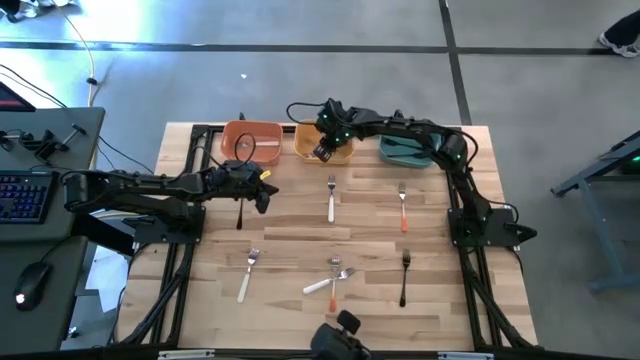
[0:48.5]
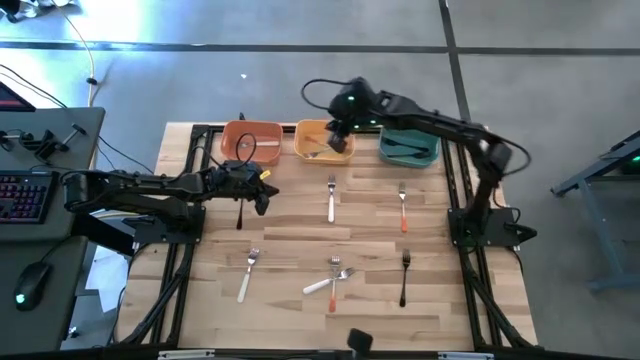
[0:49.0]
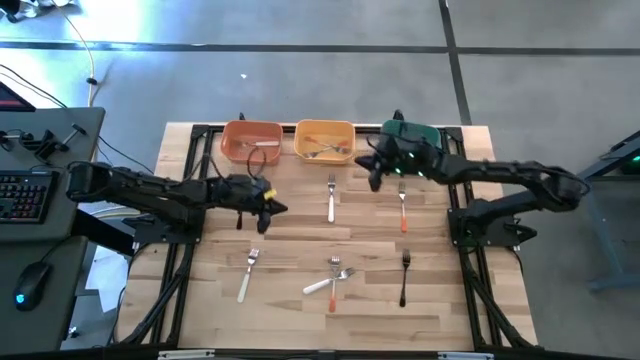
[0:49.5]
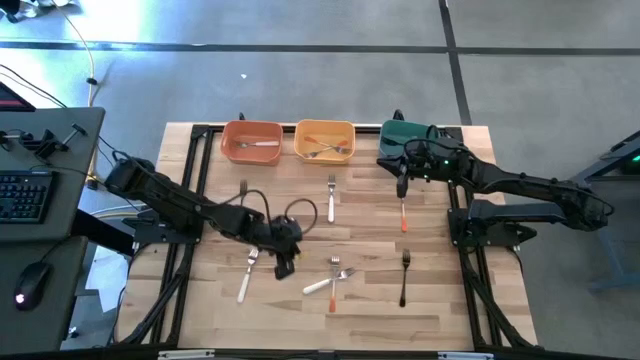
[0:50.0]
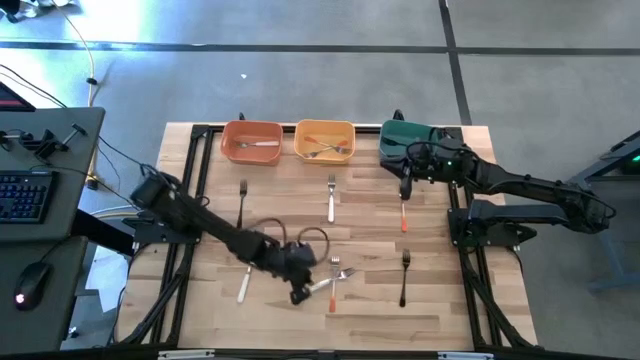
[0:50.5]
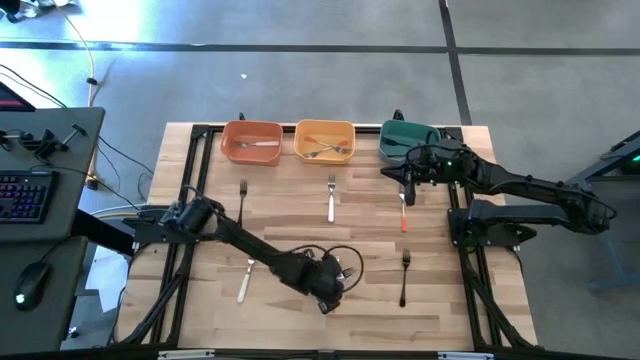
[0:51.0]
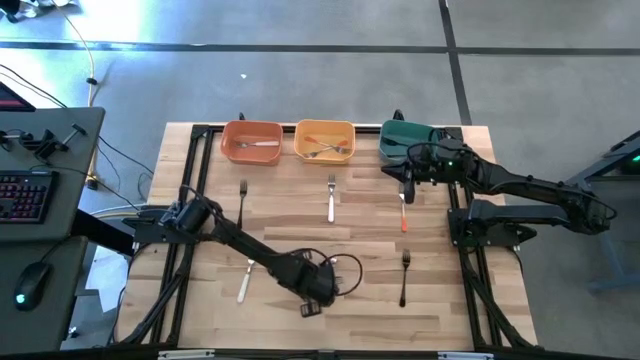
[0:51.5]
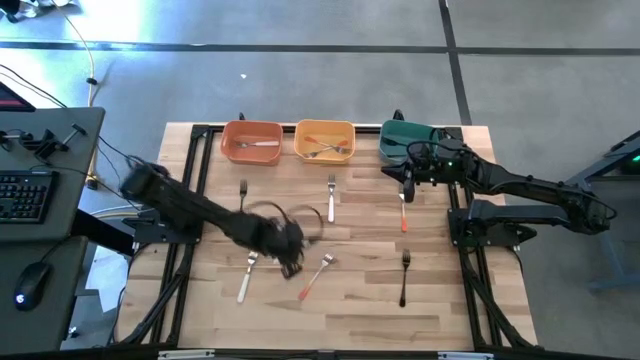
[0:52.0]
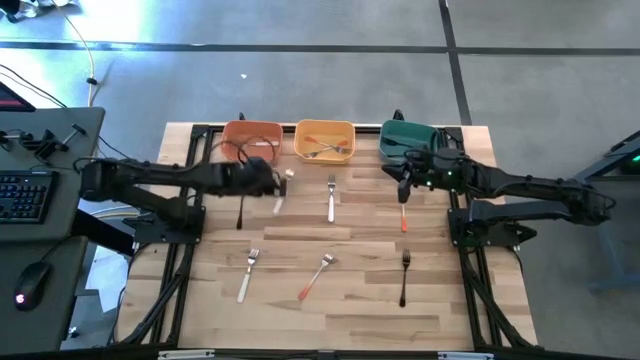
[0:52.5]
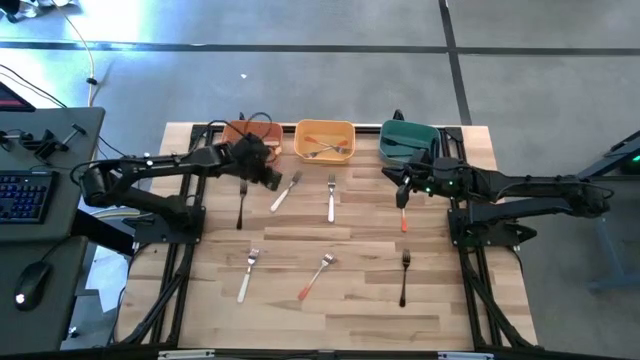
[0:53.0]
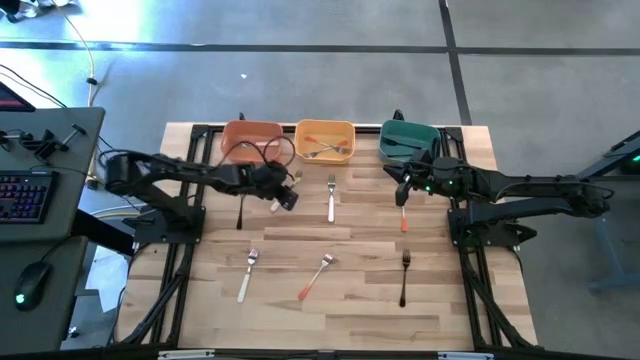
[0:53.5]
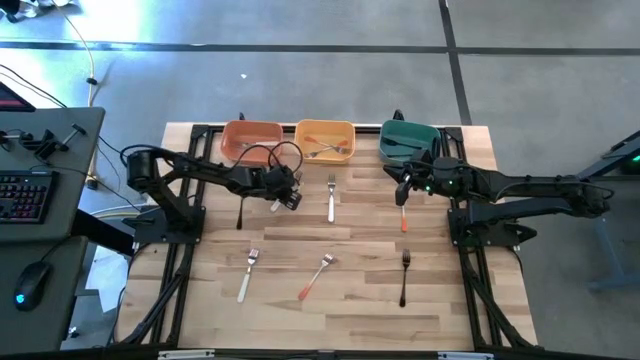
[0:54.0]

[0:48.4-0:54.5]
Task: Sort silverware by color (type)
Put the white fork into the orange bin

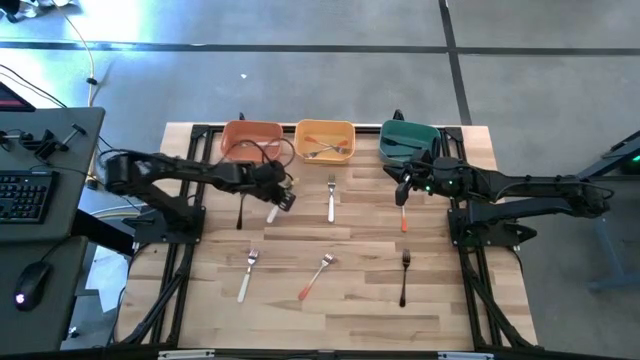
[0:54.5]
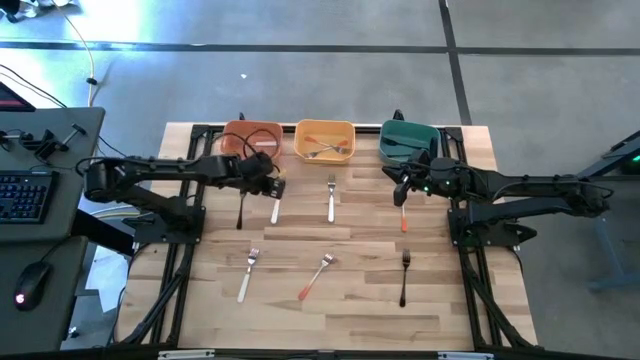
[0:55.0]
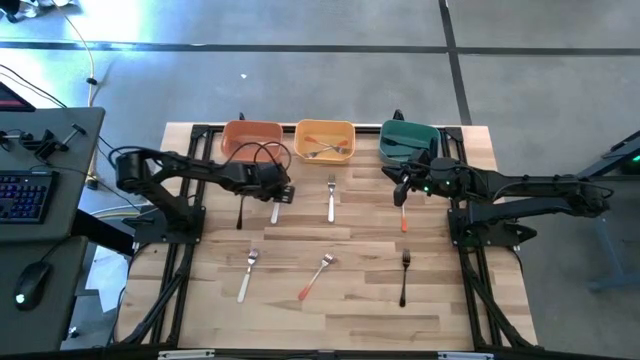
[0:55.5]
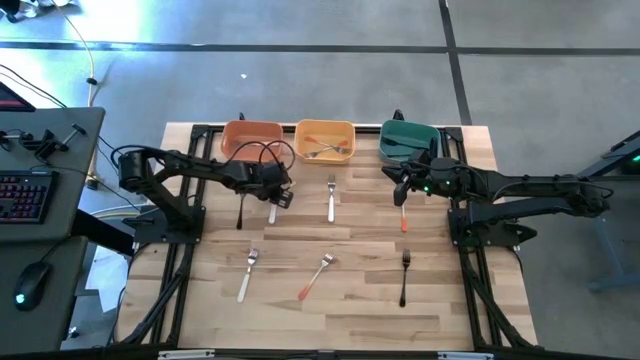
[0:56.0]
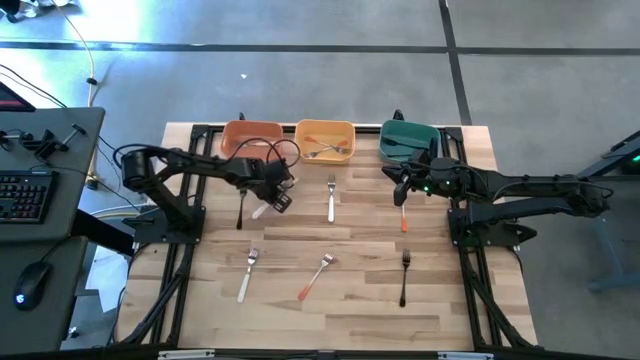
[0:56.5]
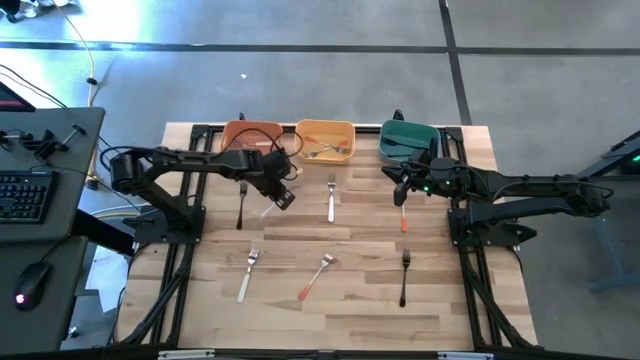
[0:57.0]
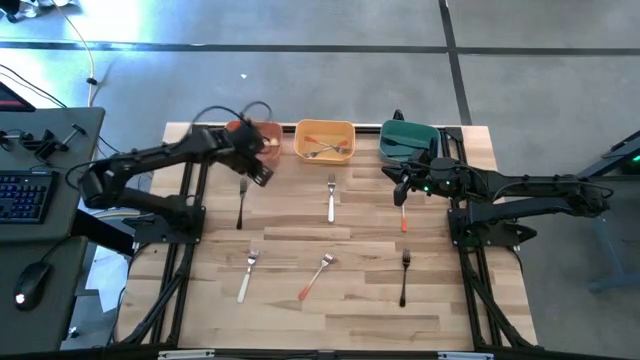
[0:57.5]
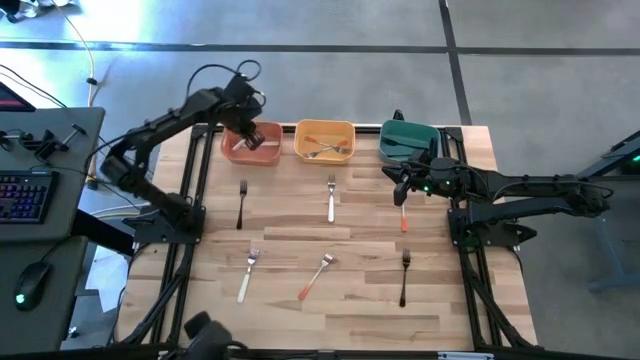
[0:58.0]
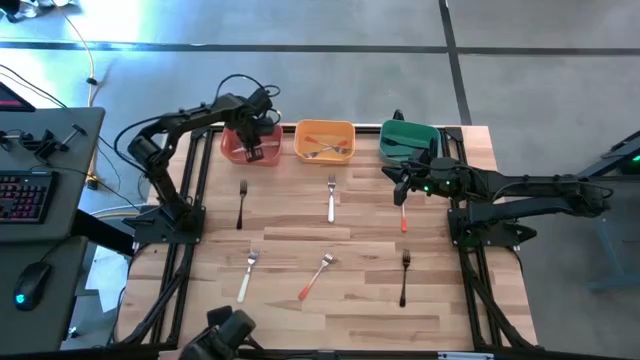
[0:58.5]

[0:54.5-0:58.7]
Put the white fork into the orange bin

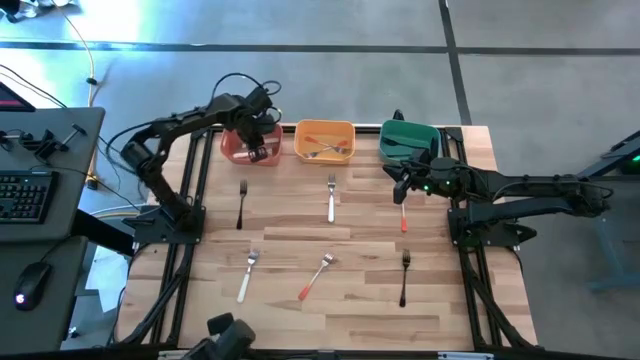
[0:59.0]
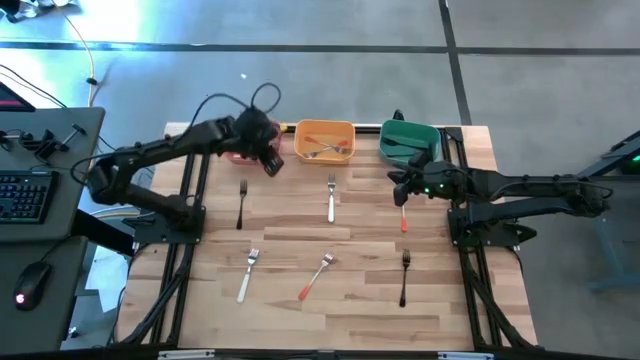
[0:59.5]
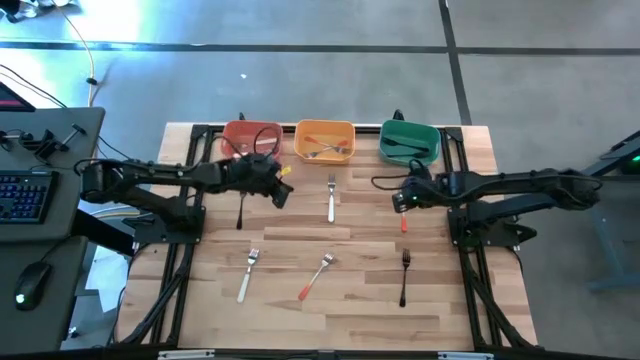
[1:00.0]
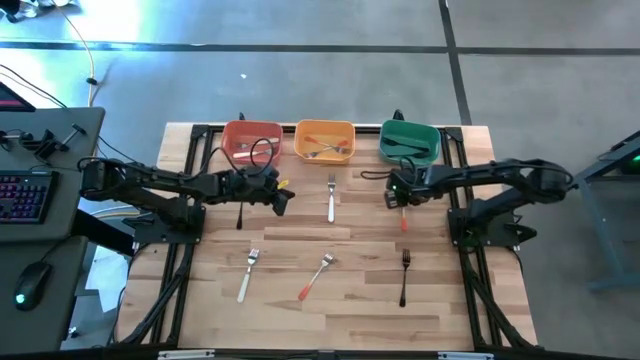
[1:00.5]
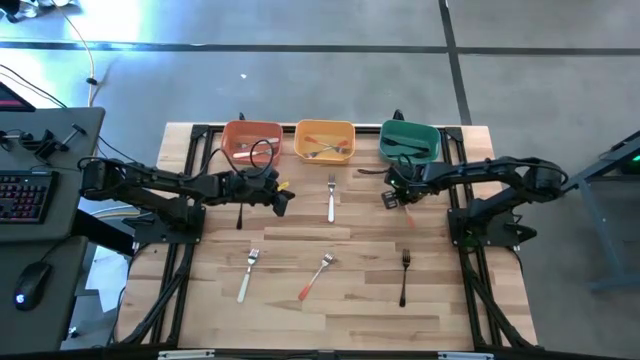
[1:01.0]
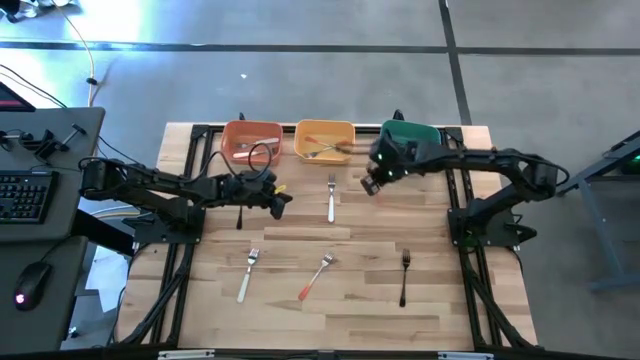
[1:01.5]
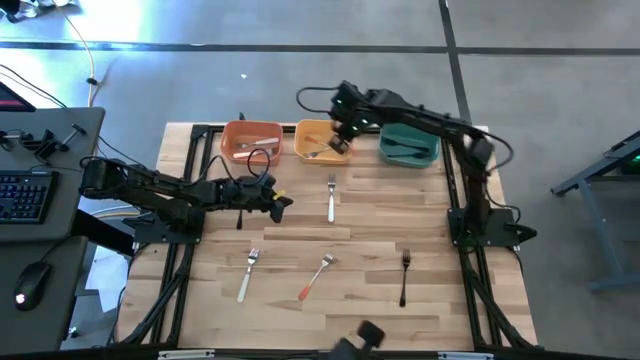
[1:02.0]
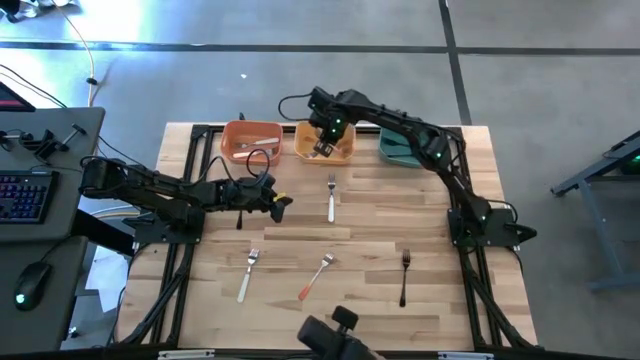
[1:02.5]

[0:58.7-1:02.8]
Put the orange fork into the yellow bin

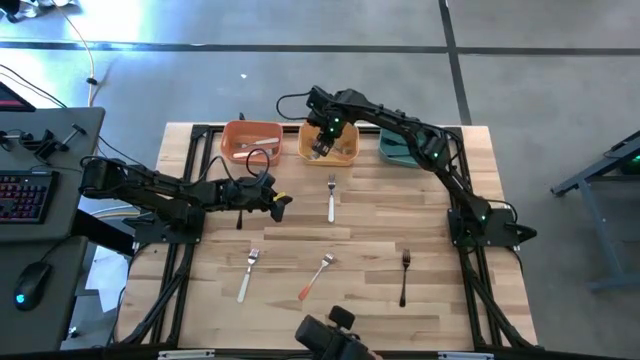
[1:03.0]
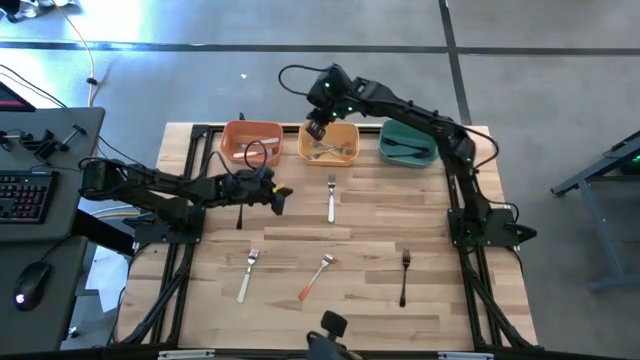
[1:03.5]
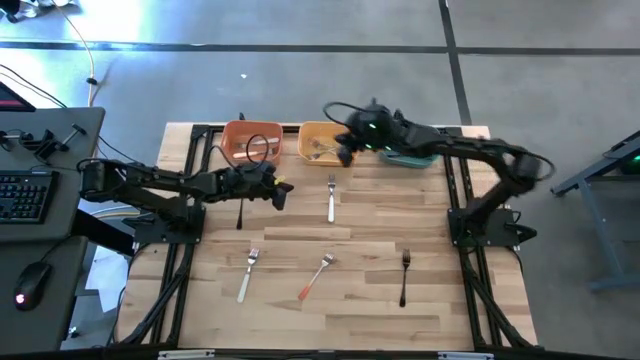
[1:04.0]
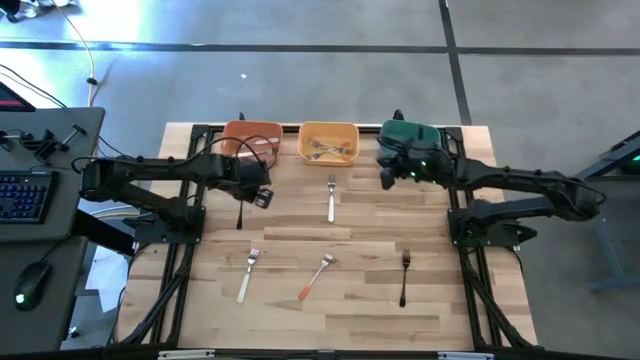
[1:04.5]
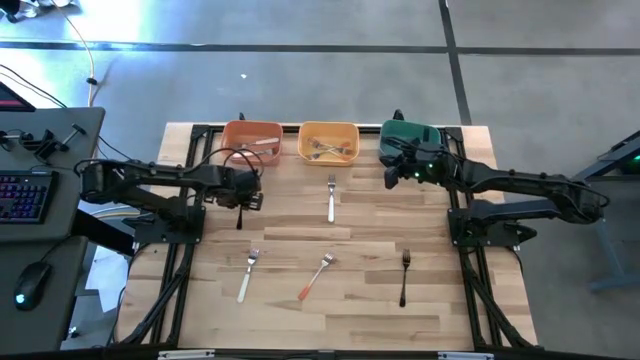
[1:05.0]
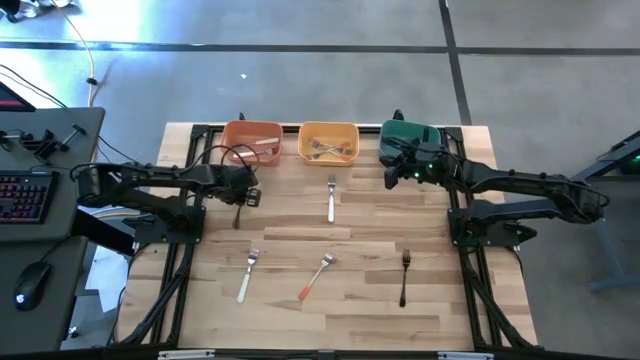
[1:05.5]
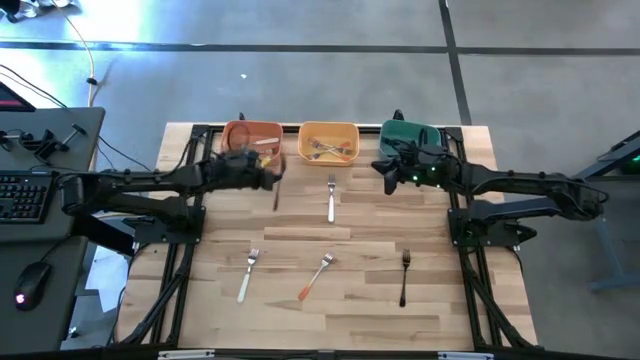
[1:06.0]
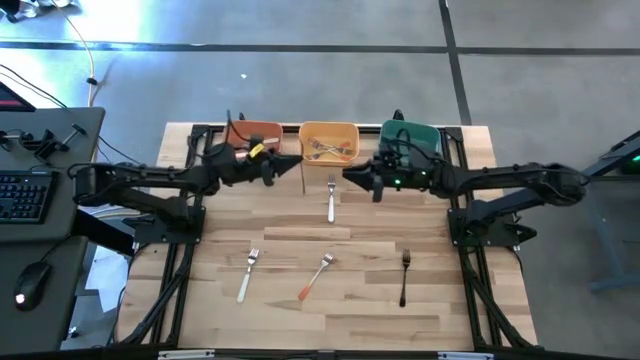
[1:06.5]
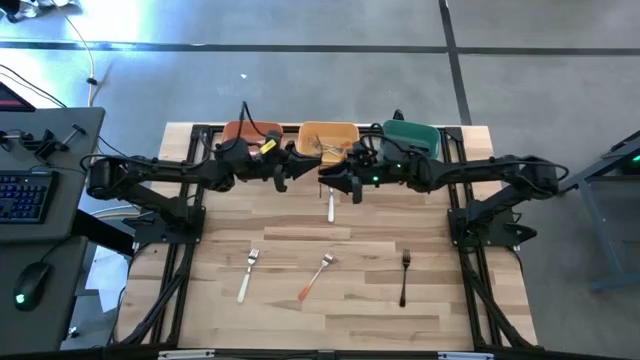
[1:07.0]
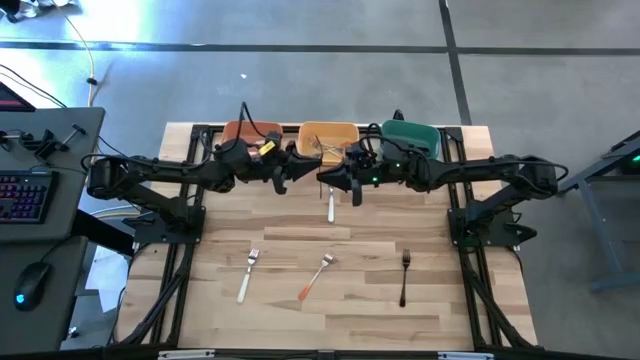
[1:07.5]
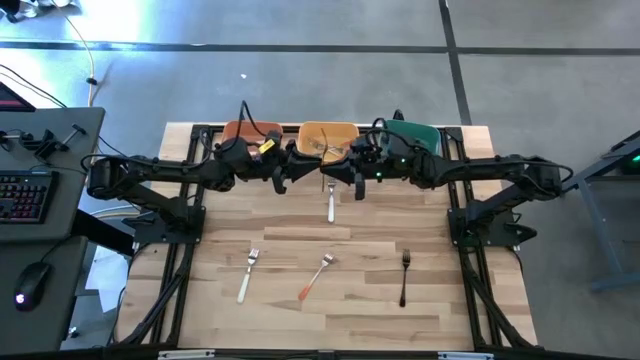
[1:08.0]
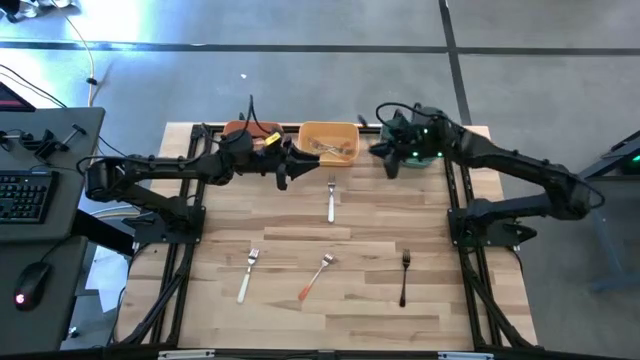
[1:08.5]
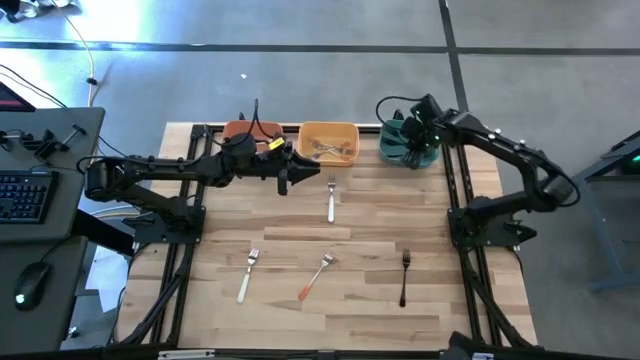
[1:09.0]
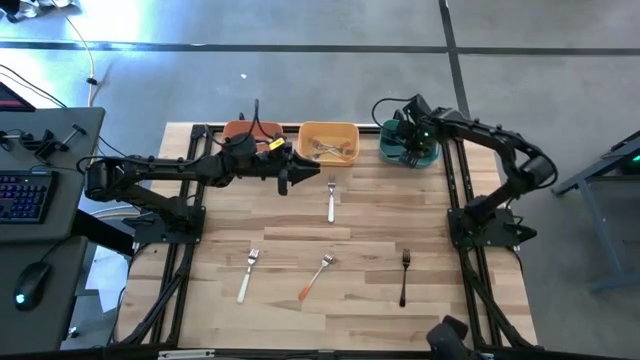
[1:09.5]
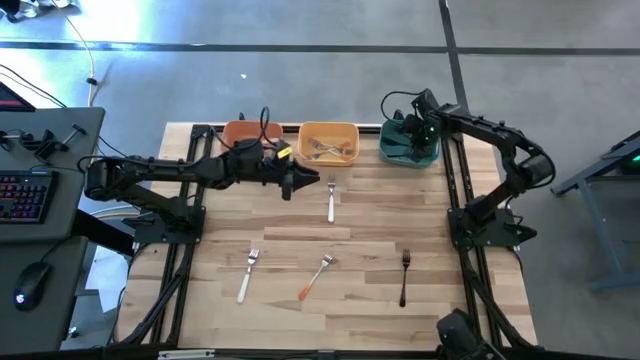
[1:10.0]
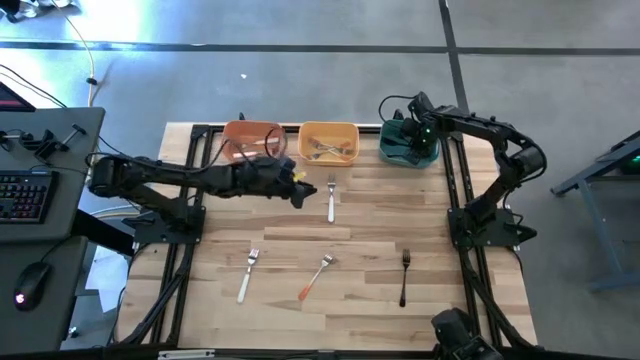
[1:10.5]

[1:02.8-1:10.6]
Put the black fork into the green bin
